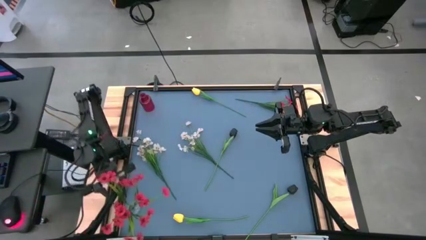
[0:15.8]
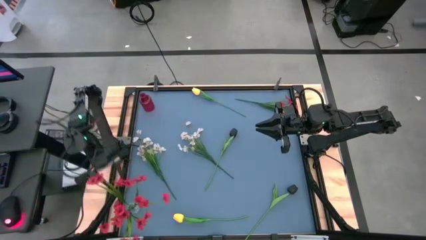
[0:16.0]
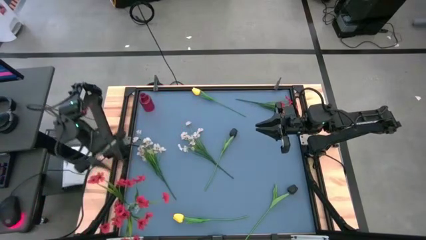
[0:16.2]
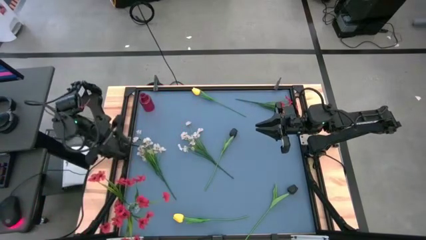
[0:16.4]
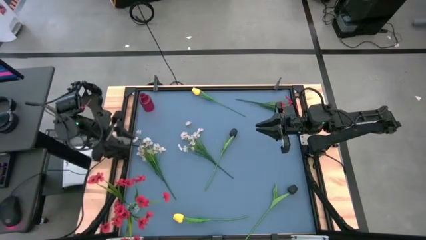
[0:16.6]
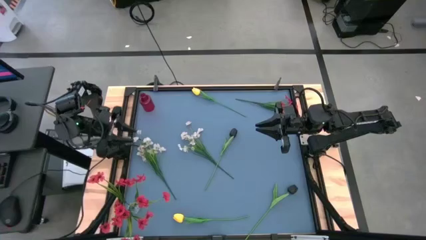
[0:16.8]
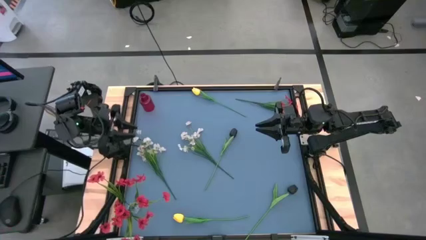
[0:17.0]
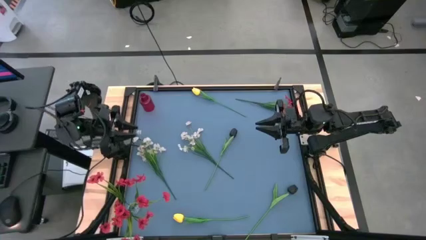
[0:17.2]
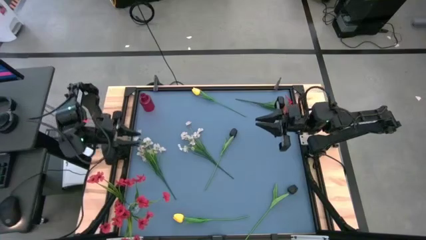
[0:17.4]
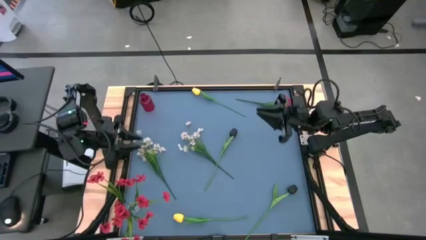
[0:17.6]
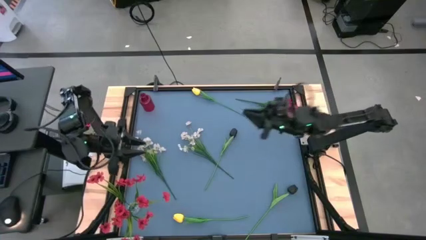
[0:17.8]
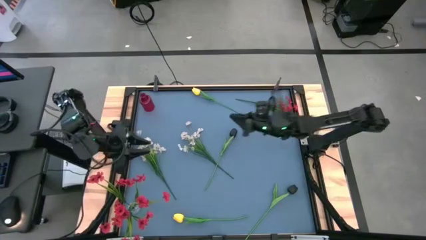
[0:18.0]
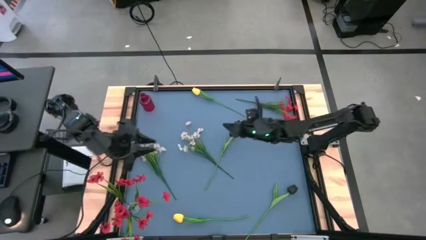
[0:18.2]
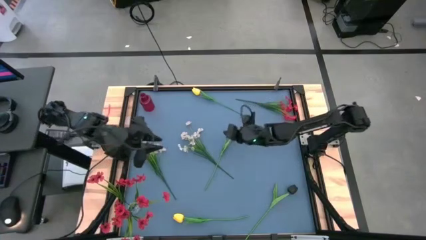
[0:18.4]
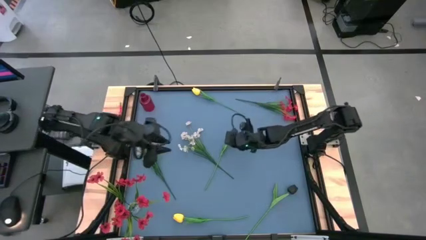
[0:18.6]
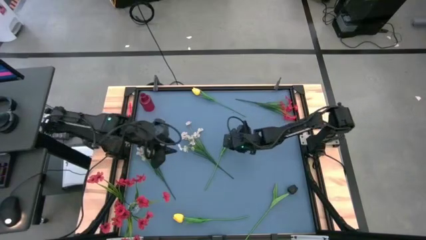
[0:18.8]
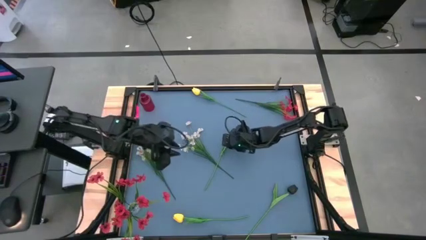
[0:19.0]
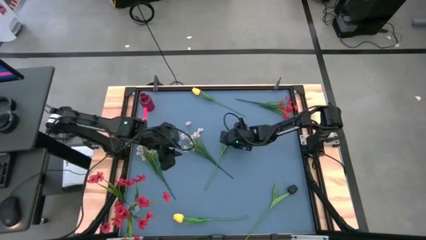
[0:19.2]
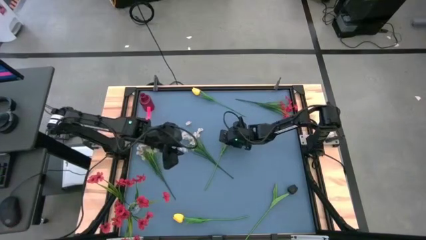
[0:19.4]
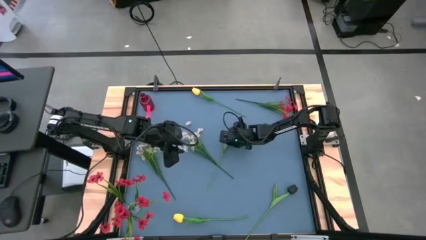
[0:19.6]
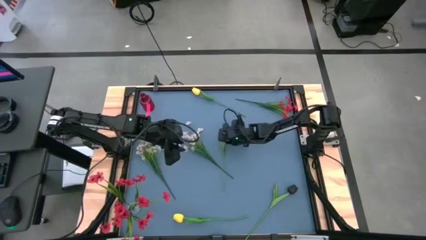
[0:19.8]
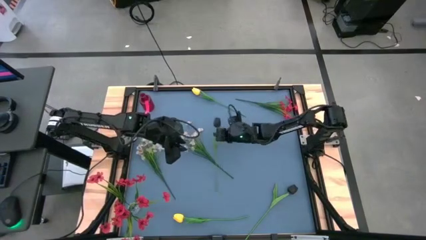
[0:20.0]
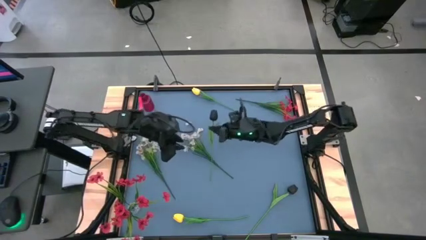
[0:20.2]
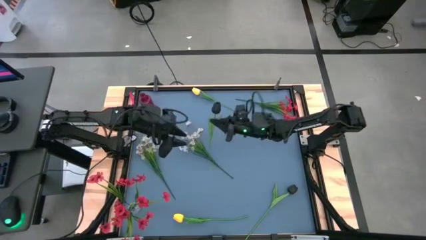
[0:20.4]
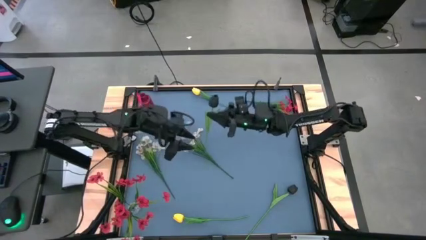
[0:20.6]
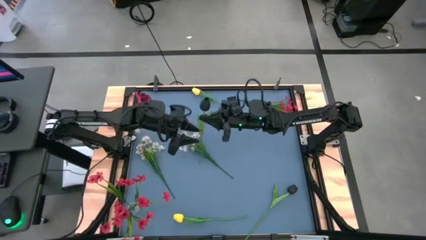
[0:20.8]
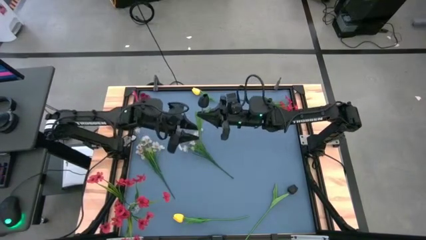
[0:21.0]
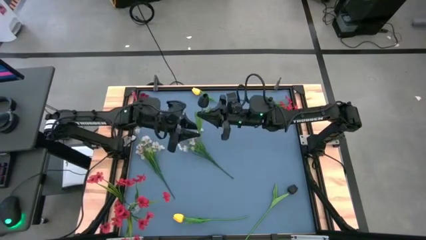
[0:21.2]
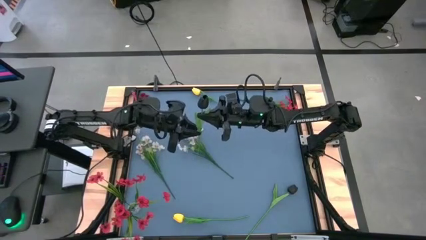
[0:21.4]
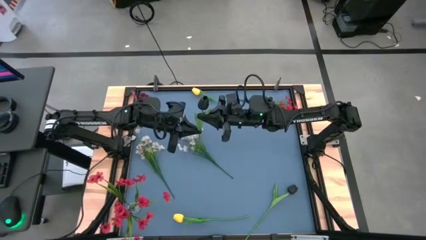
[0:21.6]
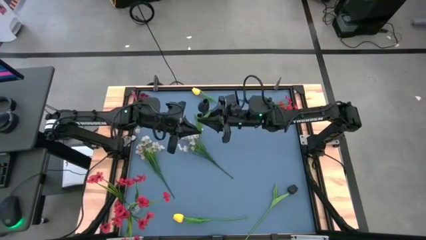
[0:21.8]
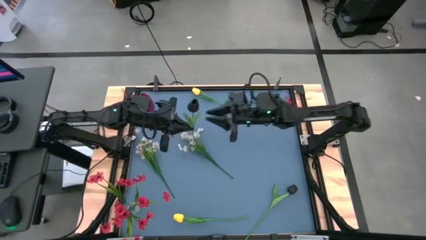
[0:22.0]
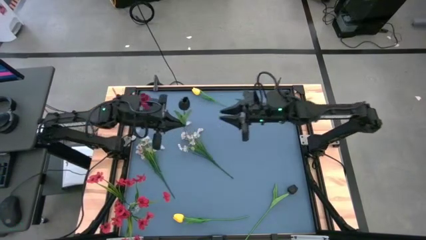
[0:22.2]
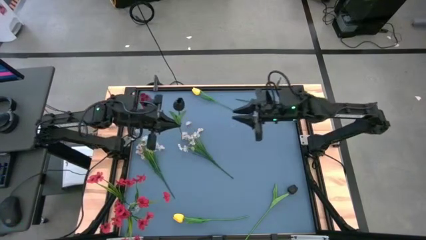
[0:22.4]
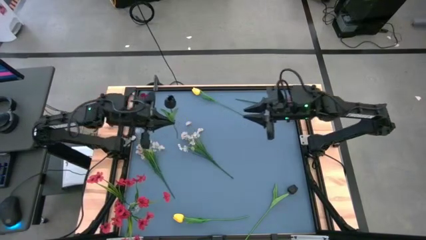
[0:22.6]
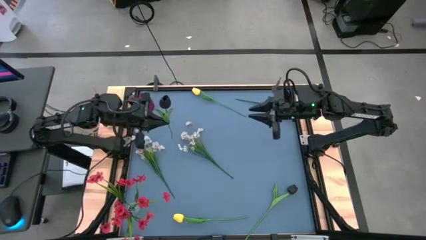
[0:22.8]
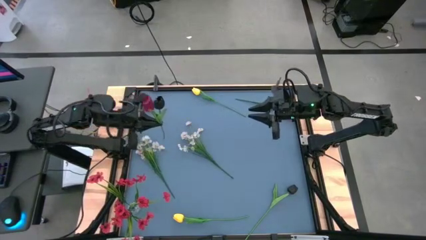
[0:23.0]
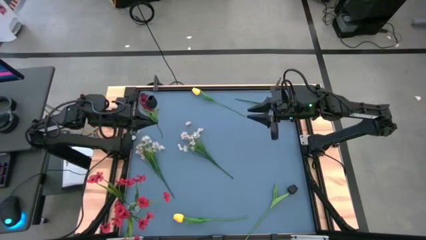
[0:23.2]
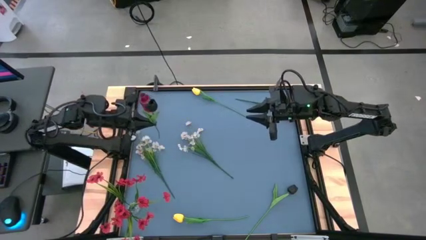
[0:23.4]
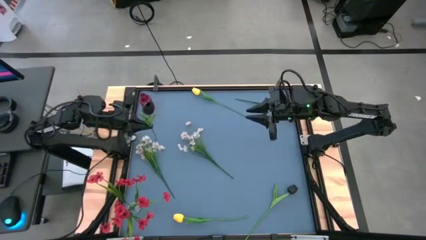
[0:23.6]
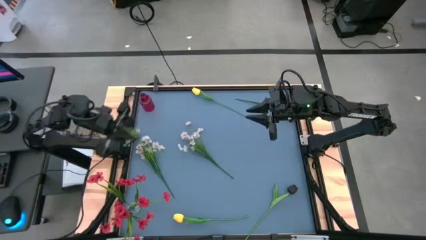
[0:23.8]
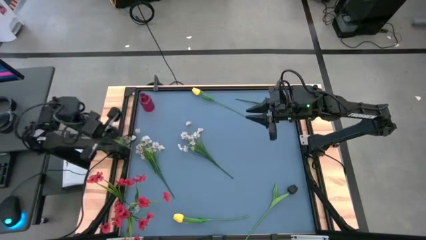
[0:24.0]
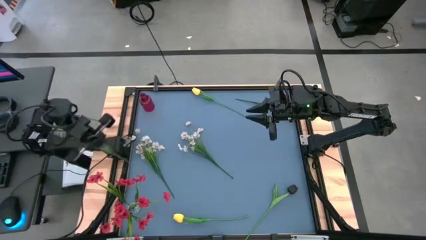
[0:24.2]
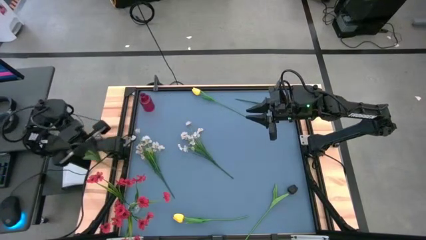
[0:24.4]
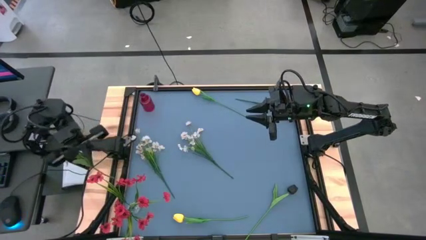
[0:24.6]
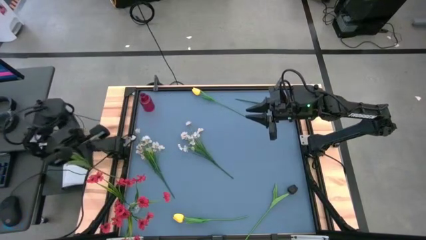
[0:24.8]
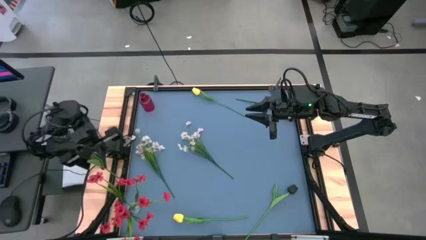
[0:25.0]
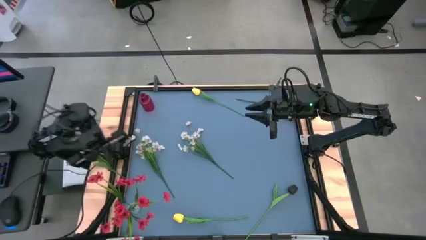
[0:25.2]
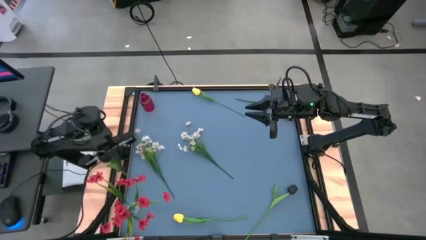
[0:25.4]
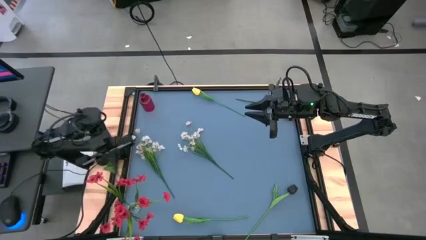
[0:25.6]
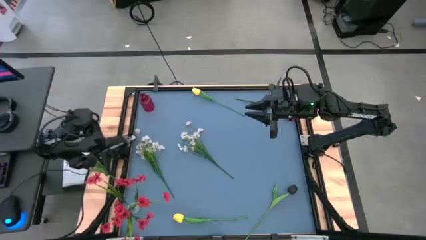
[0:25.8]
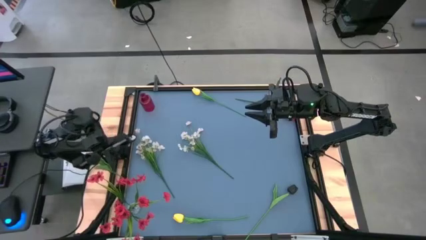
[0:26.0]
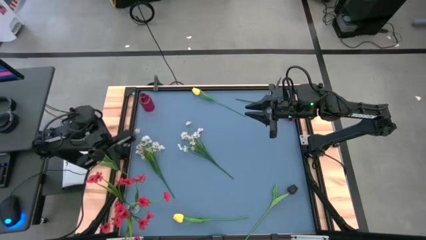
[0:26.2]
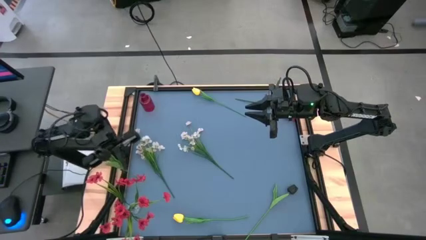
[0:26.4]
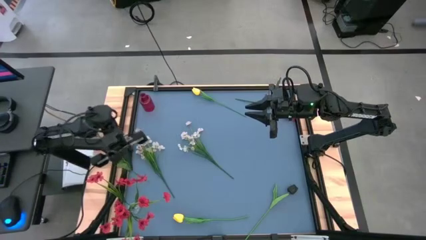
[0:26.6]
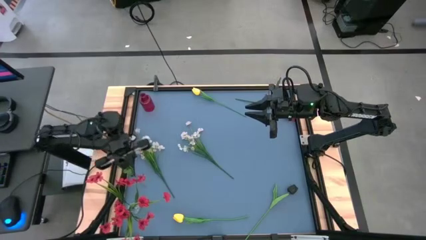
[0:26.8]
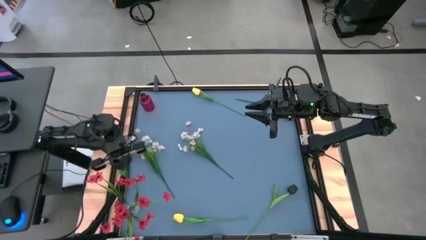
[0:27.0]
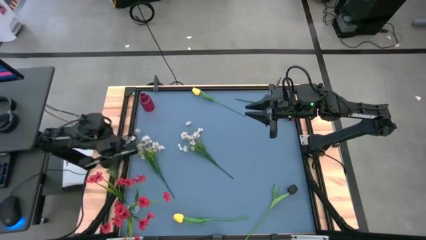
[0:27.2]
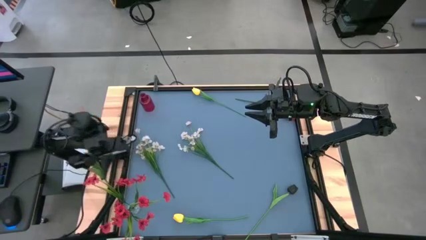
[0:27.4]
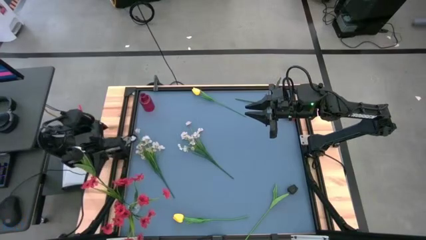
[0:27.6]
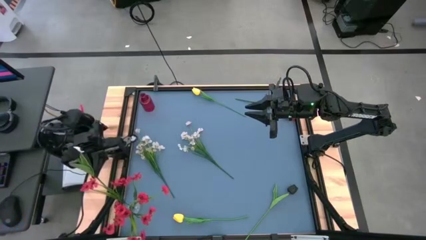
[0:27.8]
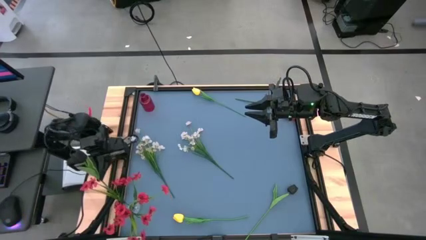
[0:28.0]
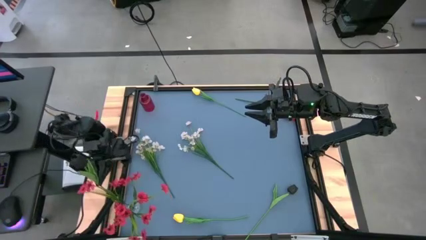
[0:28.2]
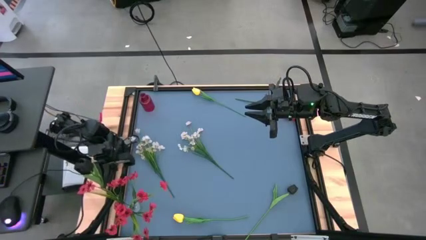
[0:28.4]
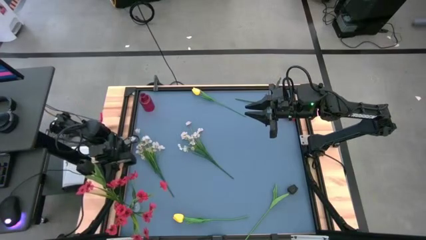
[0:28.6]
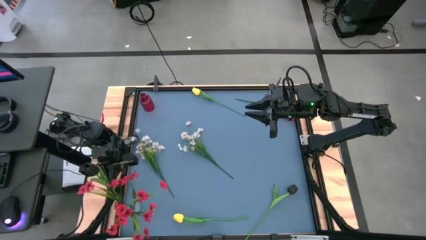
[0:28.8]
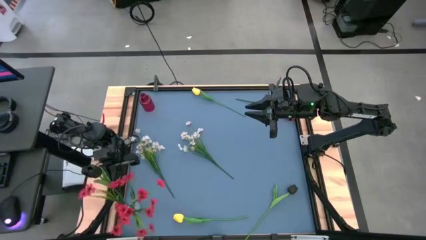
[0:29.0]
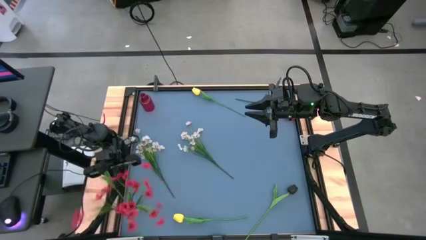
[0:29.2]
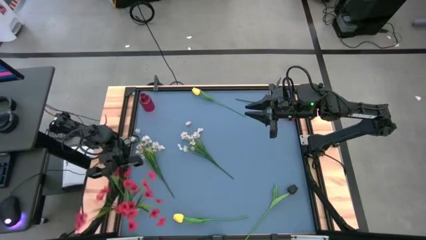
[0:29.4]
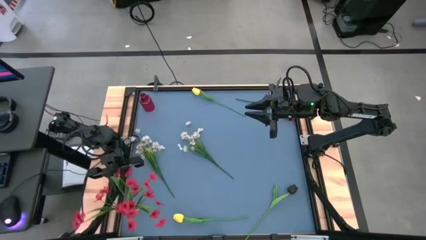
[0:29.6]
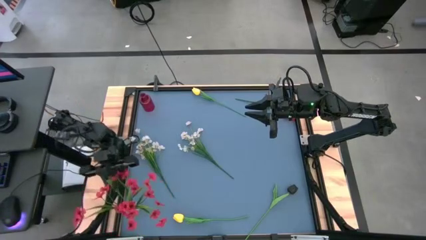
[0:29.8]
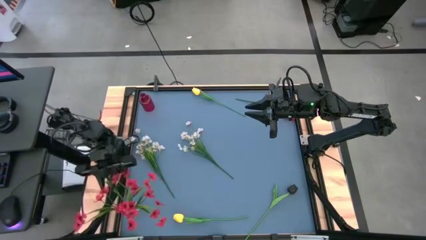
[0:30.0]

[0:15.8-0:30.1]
Task: Sort flowers into vase by color
Put the top black flower into the transparent vase
